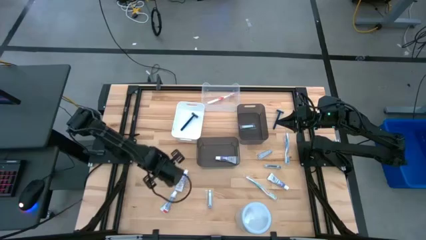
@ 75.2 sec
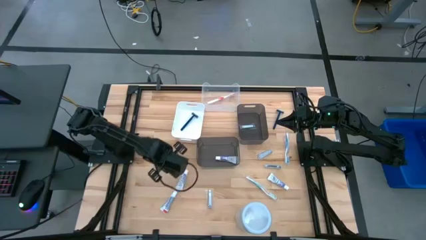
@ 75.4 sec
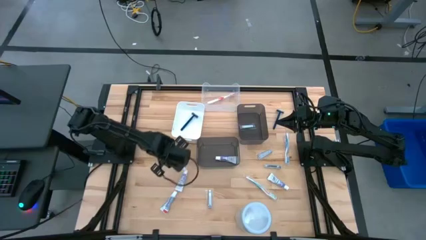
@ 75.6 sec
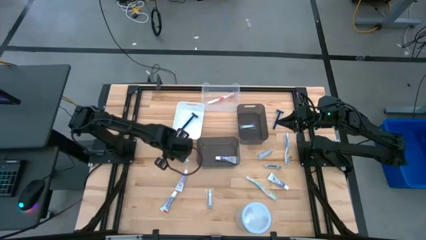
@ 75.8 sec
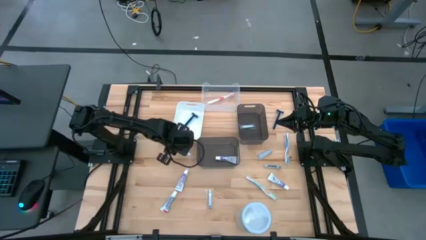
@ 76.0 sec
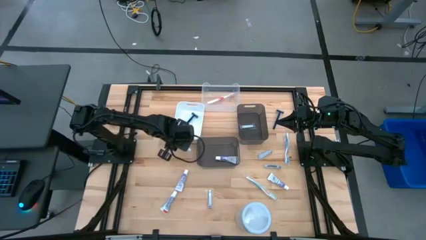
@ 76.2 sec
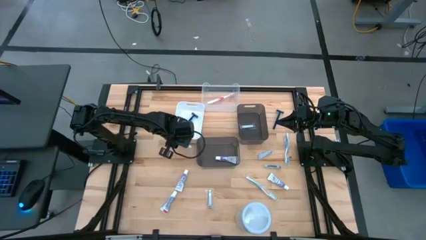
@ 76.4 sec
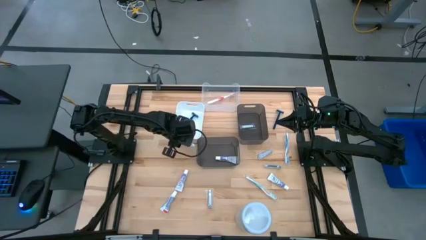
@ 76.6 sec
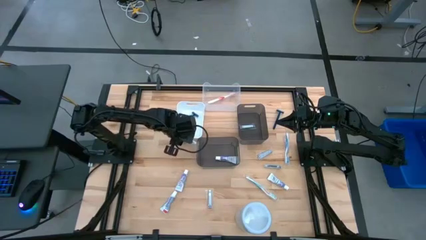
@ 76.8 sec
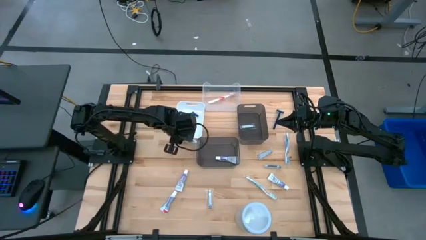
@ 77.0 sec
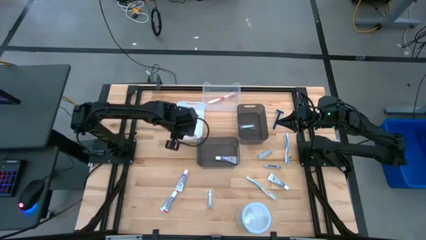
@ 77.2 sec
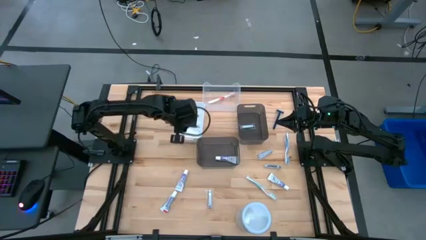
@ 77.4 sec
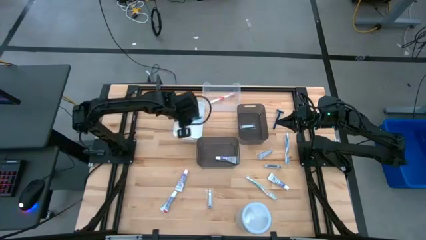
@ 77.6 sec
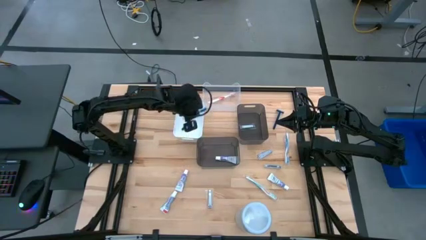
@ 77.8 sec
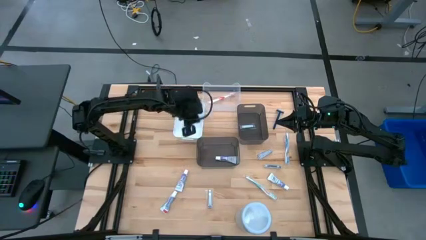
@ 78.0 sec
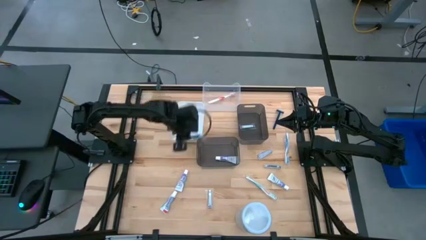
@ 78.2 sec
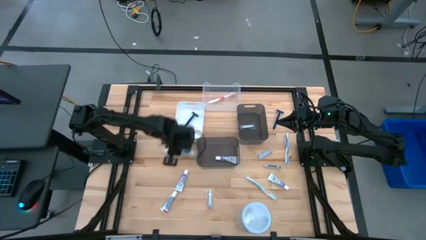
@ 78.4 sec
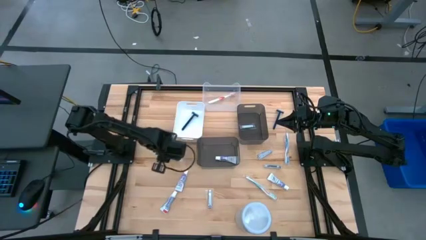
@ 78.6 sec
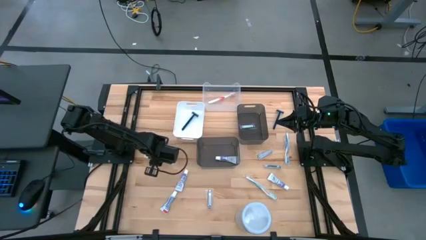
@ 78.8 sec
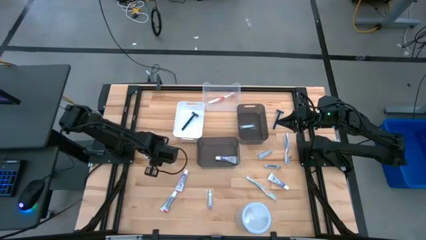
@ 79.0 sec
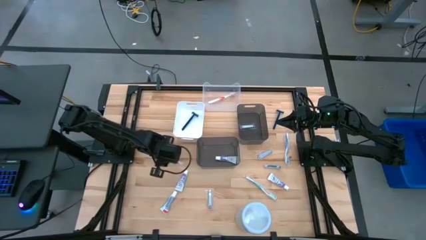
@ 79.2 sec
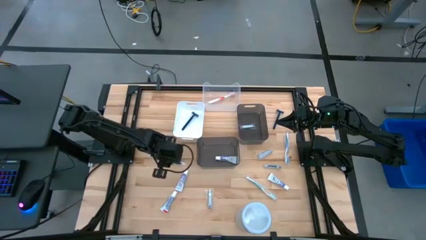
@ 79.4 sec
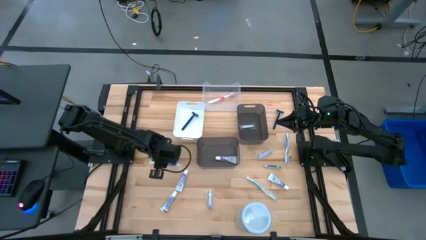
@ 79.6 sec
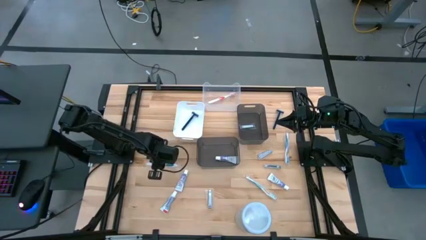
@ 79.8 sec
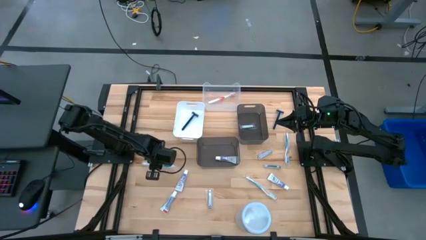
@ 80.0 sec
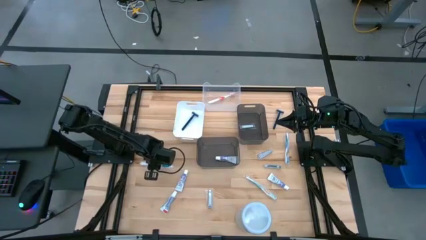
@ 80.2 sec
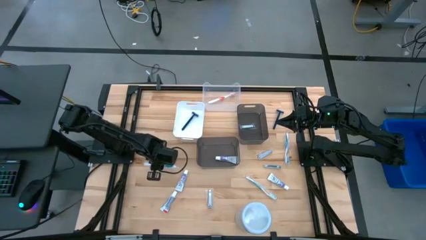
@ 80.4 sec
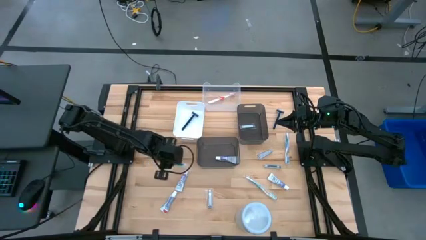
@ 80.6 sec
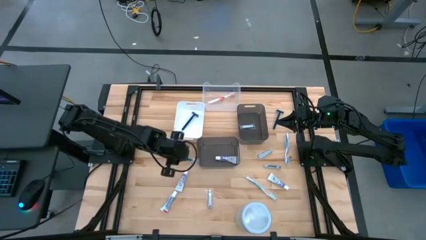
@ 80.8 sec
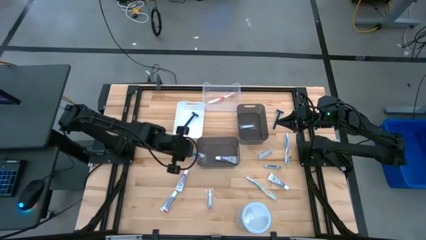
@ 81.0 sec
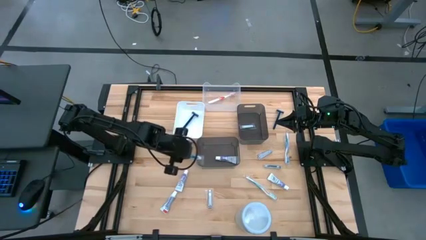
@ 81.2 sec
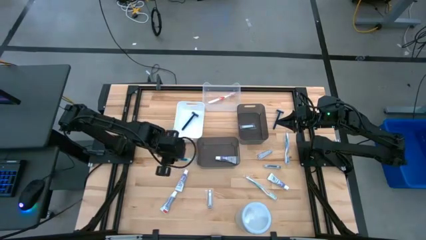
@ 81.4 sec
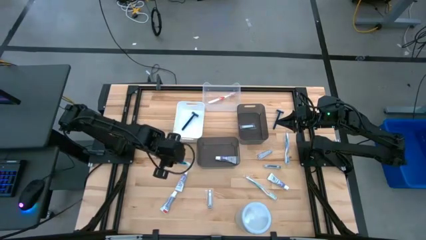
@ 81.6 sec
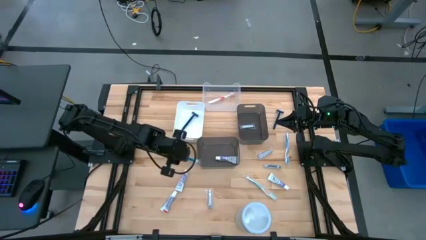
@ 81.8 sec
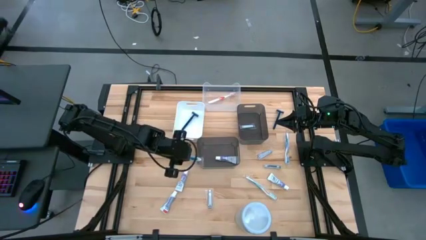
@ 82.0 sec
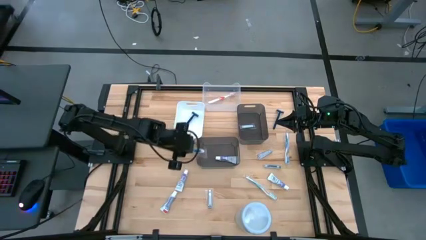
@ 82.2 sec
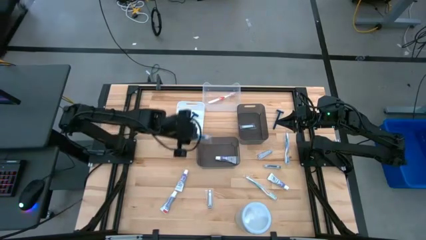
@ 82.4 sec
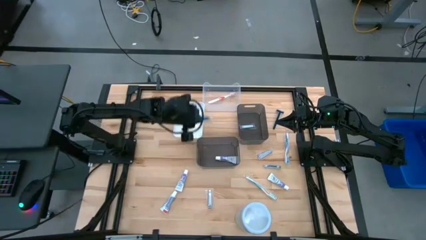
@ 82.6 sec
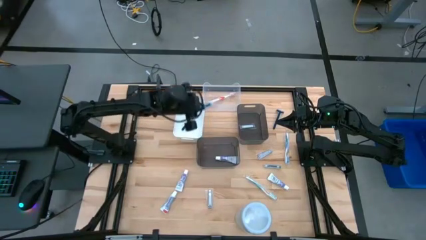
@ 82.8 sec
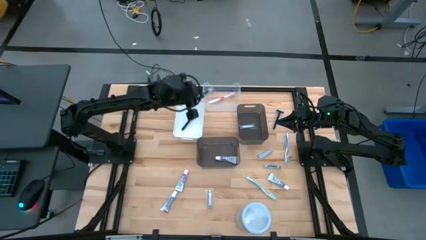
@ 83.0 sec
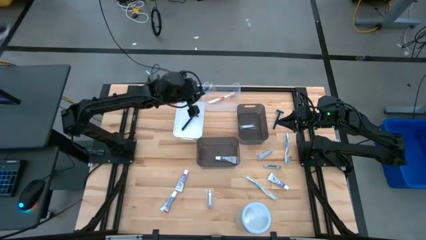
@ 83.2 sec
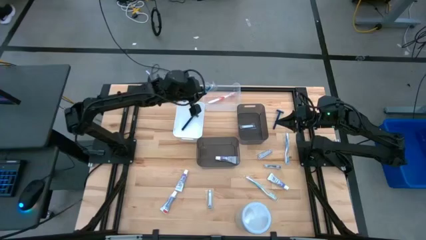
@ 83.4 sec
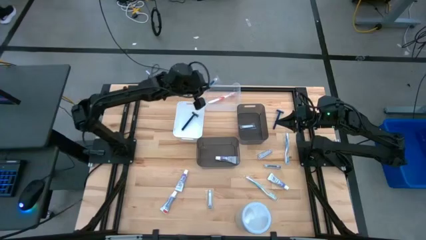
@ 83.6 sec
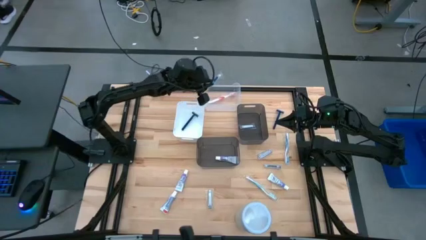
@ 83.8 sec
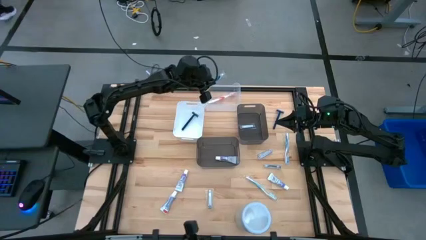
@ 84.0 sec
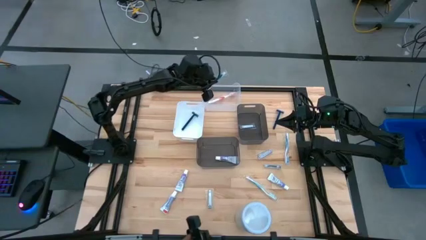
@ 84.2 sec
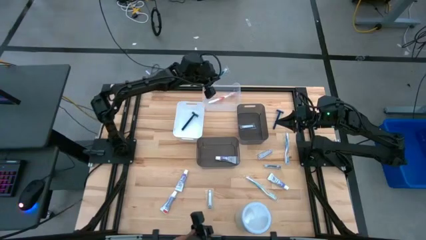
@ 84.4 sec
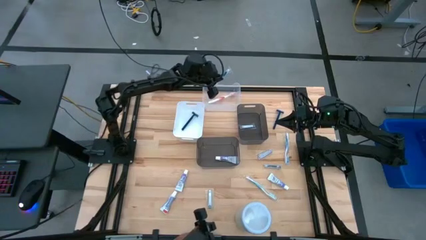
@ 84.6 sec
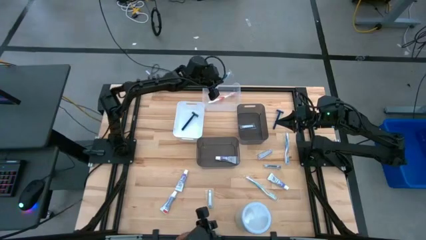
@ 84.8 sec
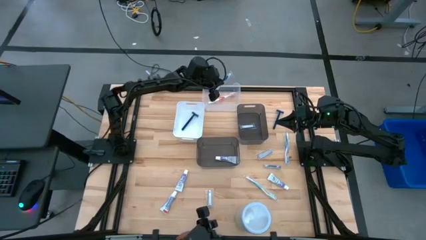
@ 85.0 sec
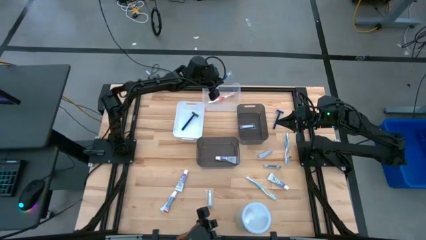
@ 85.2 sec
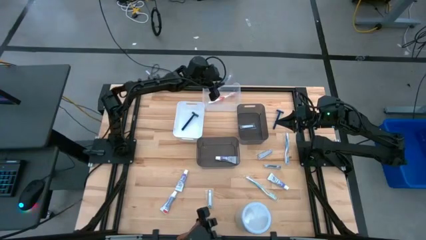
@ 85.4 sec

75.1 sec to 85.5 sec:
Task: Pick & Place Travel size toiletries
Put the blue toothbrush into the transparent bin
